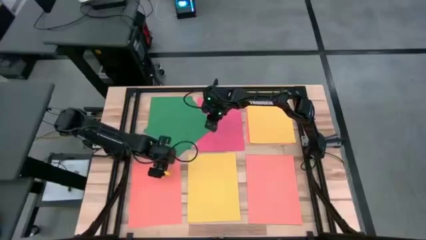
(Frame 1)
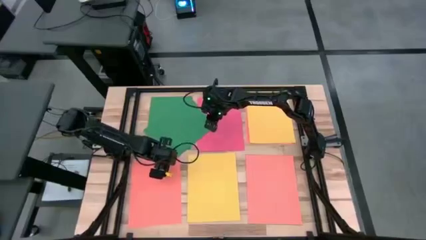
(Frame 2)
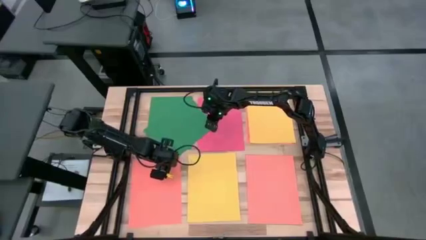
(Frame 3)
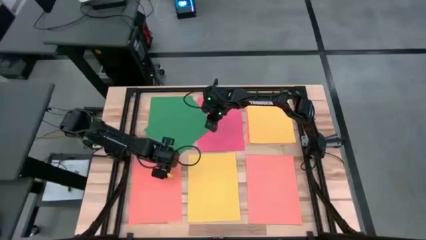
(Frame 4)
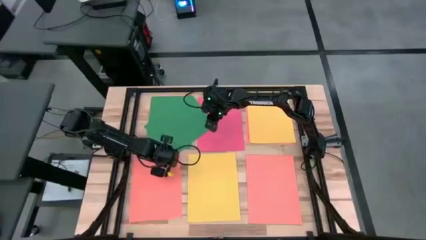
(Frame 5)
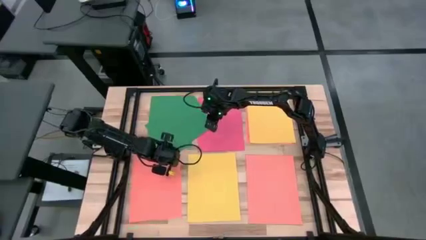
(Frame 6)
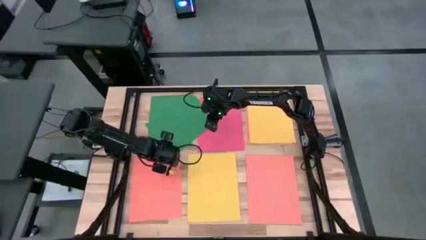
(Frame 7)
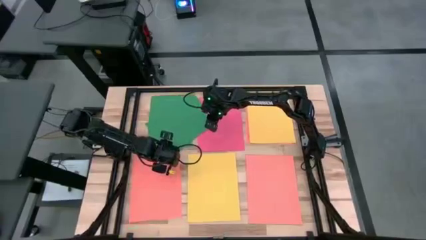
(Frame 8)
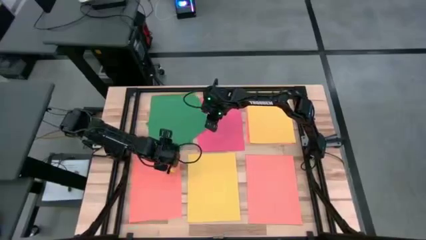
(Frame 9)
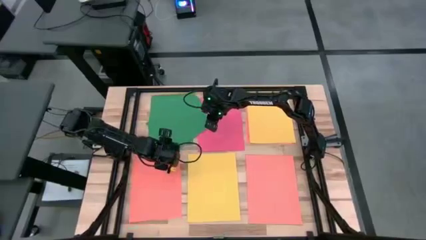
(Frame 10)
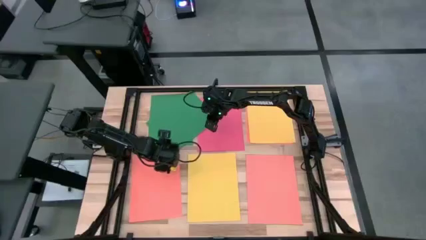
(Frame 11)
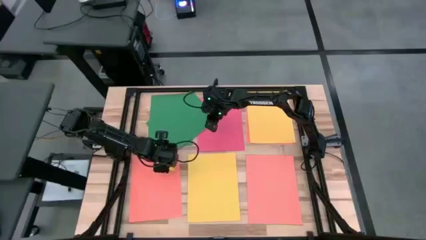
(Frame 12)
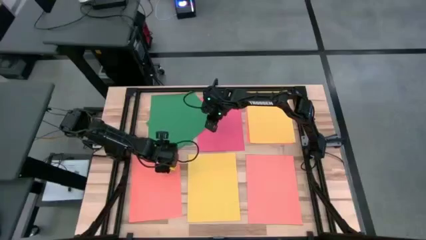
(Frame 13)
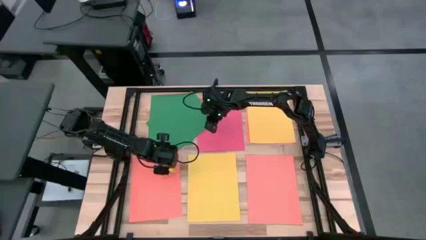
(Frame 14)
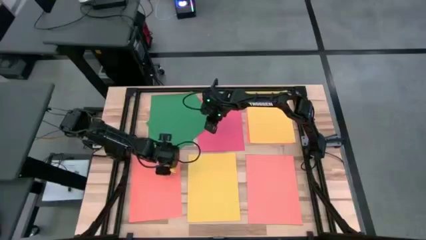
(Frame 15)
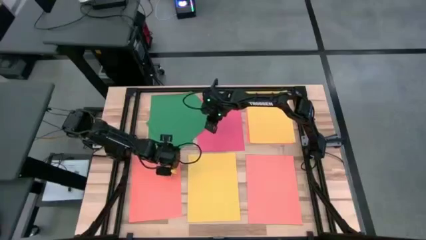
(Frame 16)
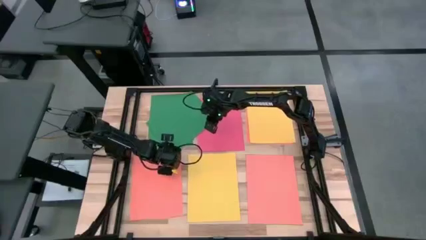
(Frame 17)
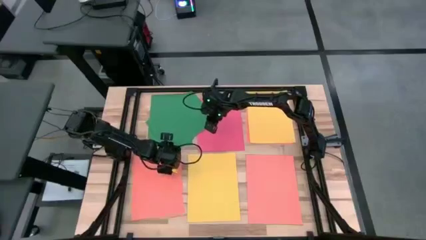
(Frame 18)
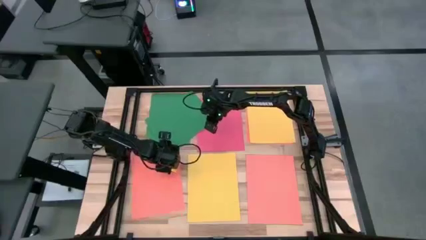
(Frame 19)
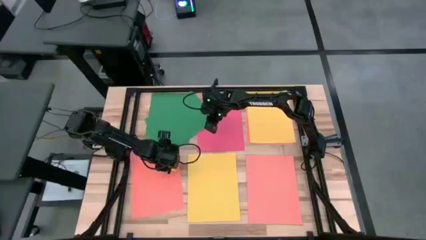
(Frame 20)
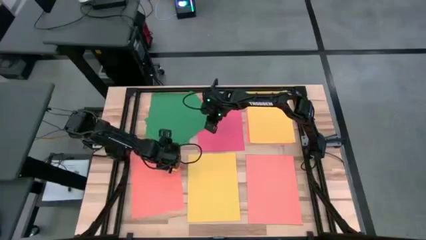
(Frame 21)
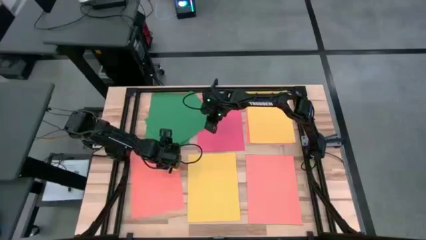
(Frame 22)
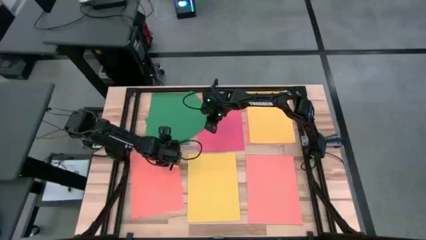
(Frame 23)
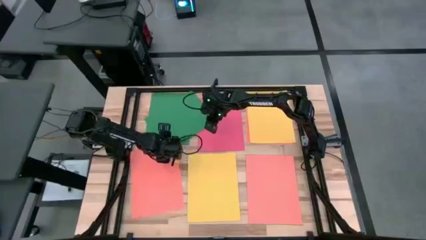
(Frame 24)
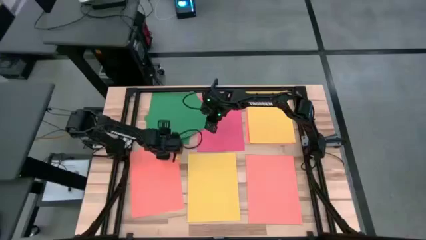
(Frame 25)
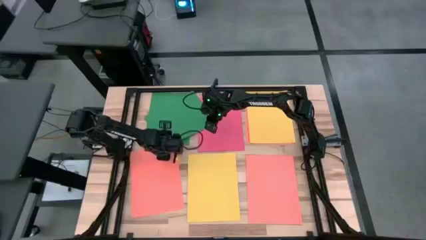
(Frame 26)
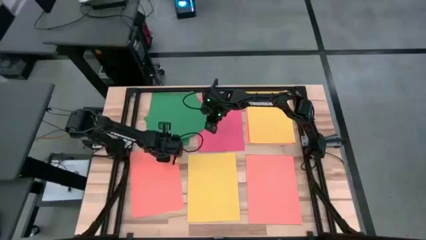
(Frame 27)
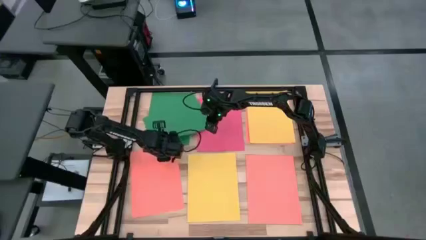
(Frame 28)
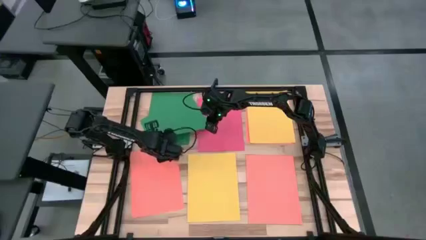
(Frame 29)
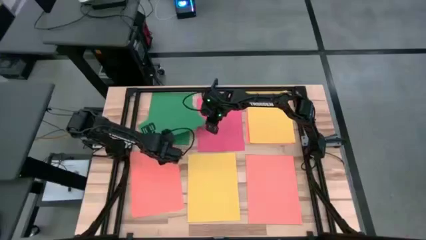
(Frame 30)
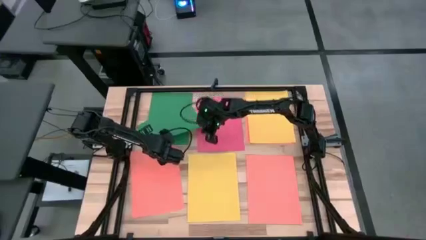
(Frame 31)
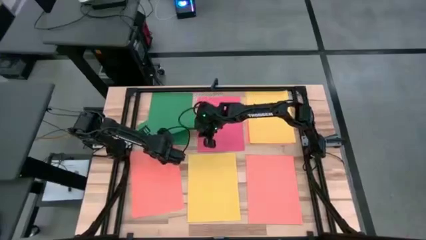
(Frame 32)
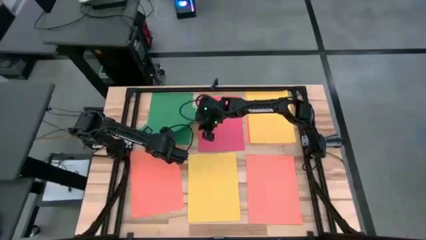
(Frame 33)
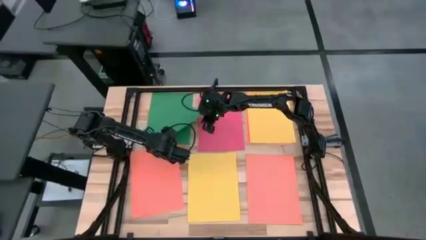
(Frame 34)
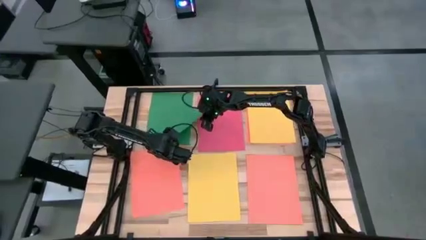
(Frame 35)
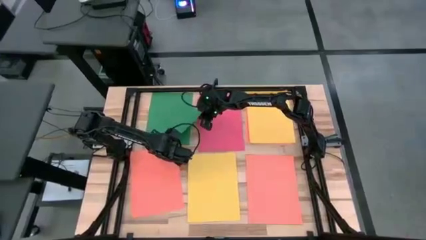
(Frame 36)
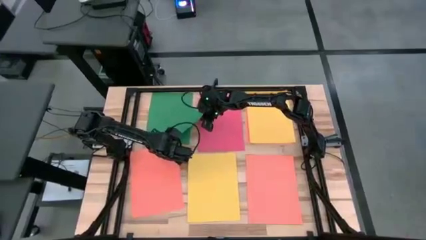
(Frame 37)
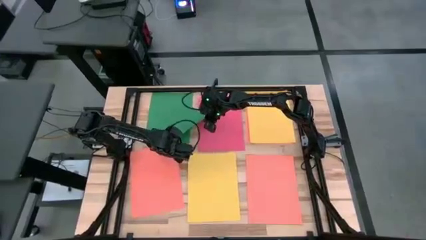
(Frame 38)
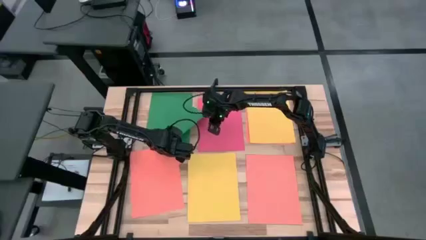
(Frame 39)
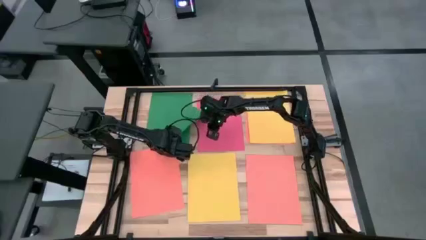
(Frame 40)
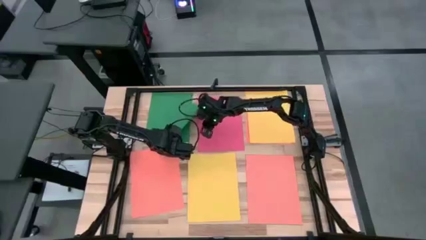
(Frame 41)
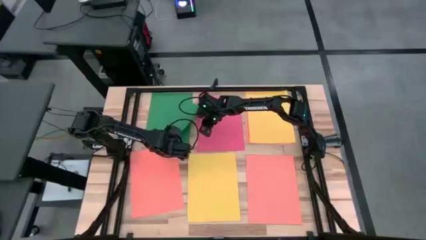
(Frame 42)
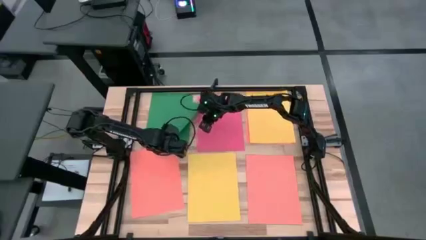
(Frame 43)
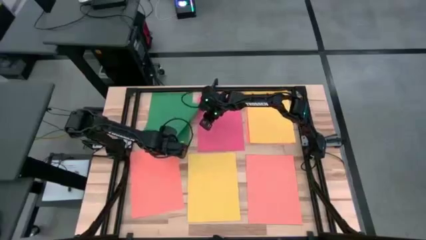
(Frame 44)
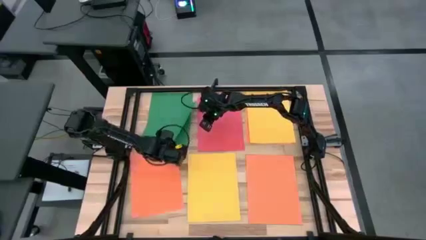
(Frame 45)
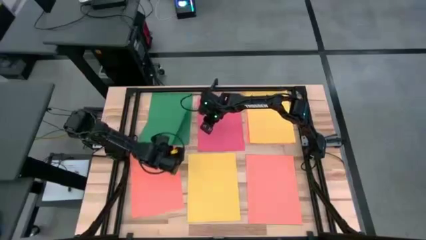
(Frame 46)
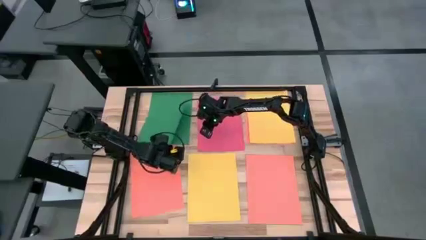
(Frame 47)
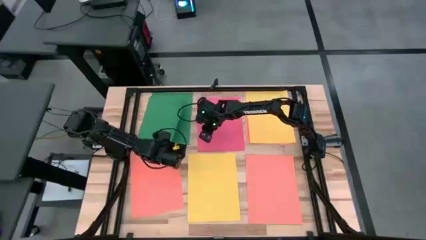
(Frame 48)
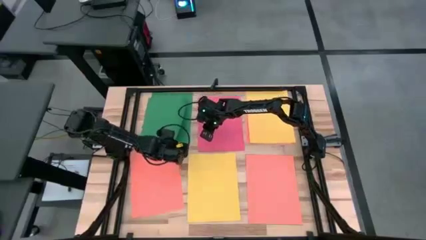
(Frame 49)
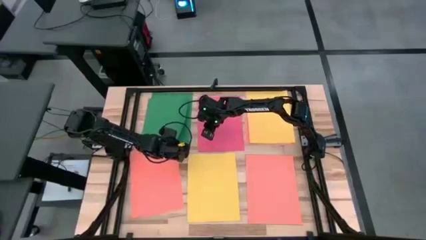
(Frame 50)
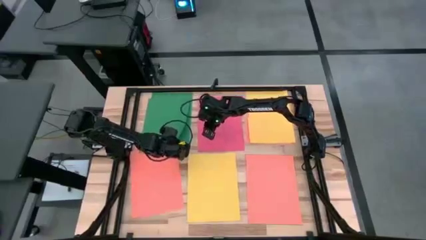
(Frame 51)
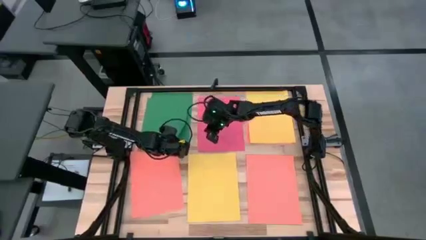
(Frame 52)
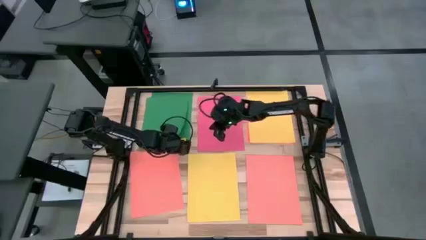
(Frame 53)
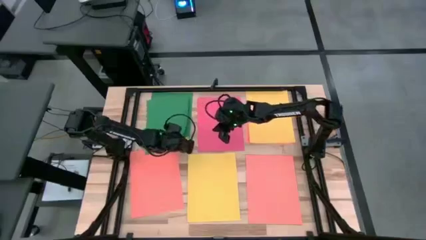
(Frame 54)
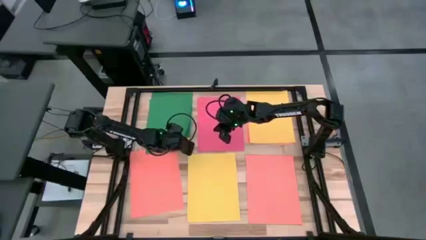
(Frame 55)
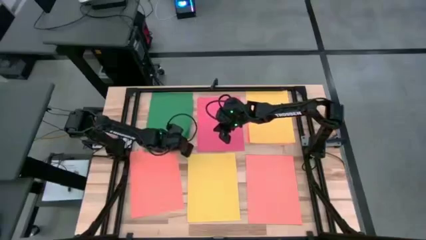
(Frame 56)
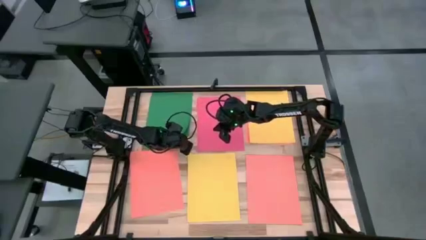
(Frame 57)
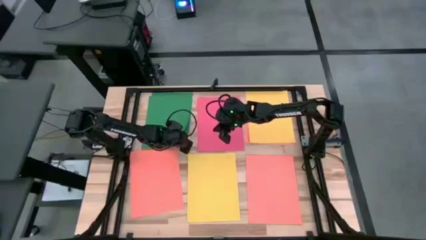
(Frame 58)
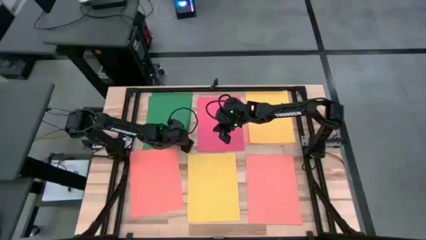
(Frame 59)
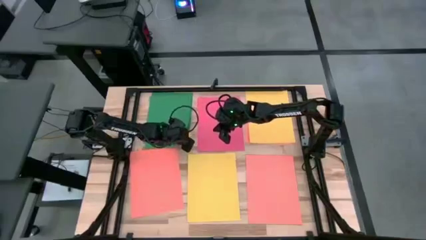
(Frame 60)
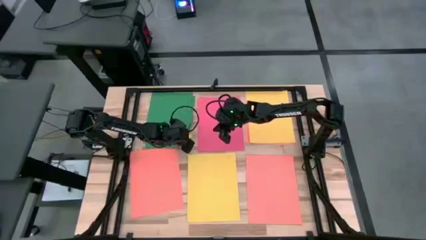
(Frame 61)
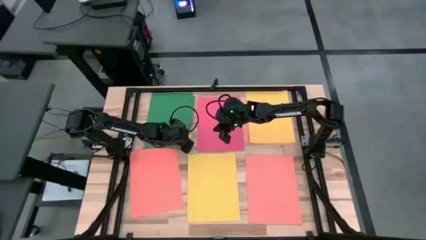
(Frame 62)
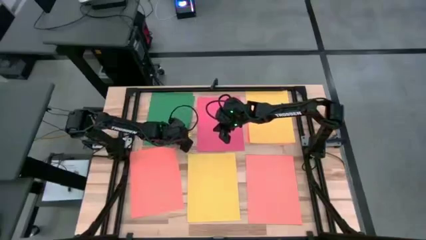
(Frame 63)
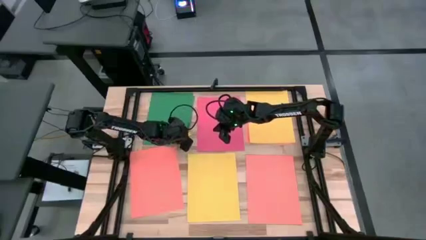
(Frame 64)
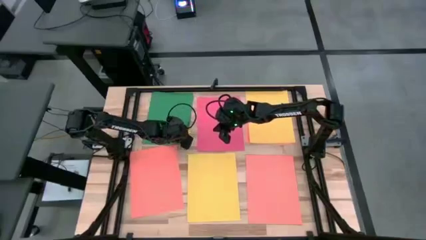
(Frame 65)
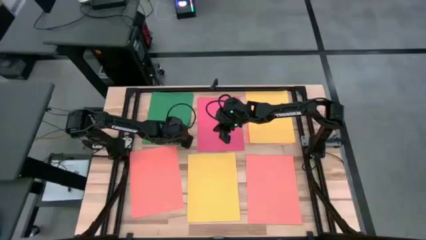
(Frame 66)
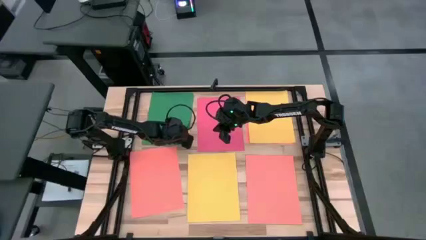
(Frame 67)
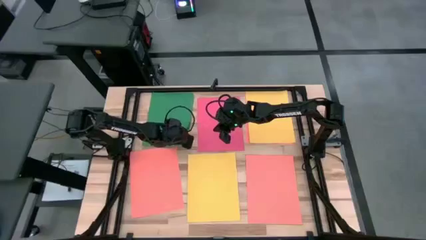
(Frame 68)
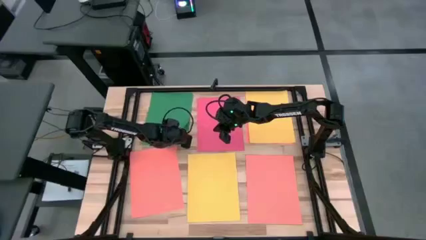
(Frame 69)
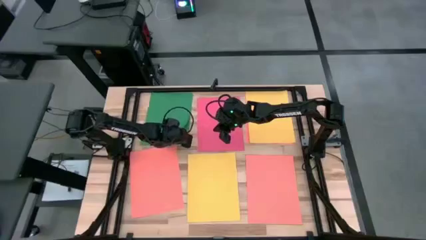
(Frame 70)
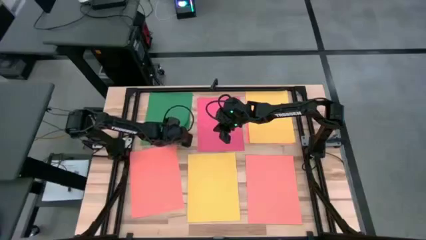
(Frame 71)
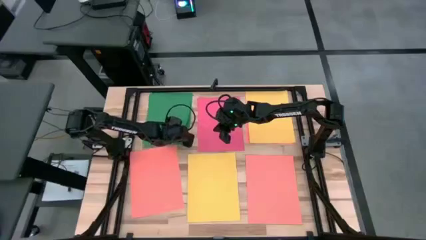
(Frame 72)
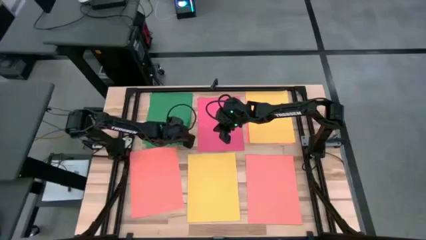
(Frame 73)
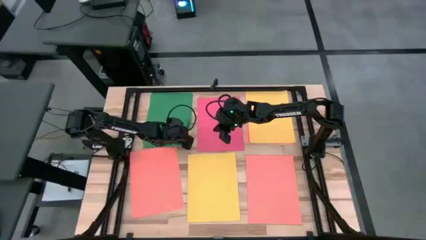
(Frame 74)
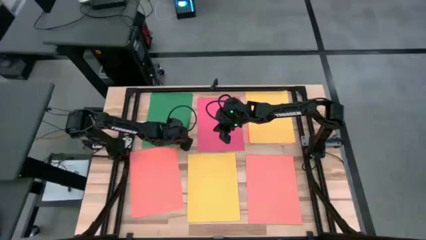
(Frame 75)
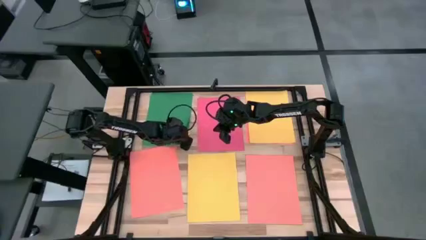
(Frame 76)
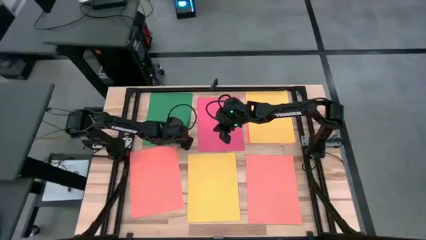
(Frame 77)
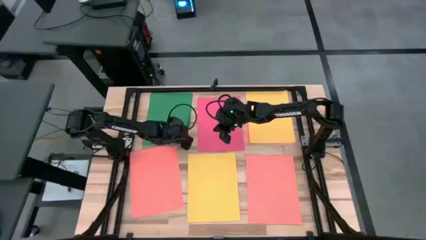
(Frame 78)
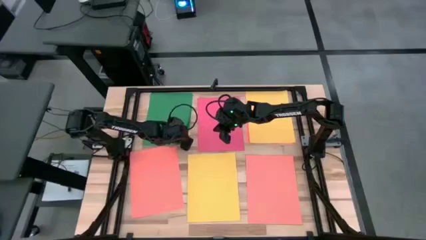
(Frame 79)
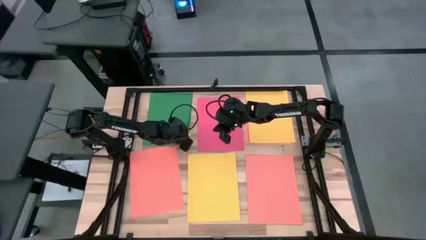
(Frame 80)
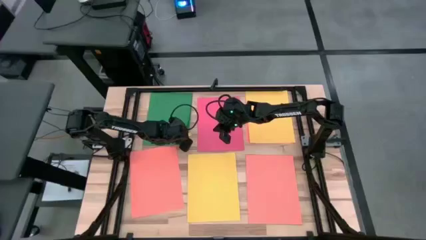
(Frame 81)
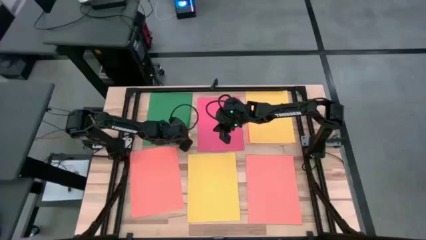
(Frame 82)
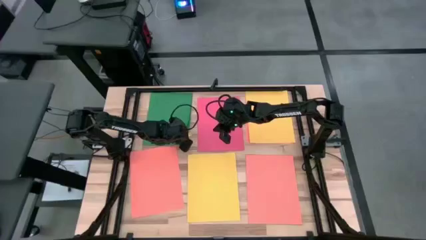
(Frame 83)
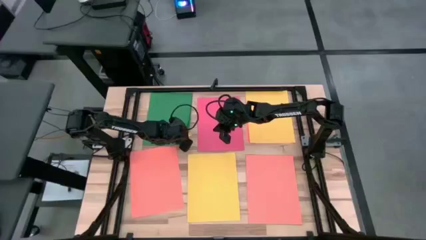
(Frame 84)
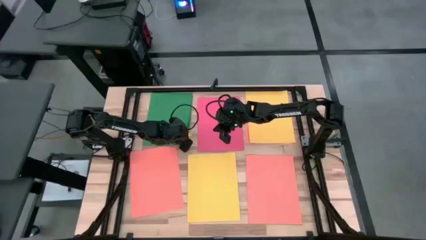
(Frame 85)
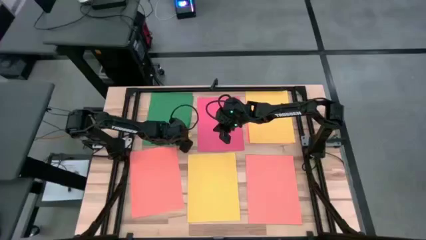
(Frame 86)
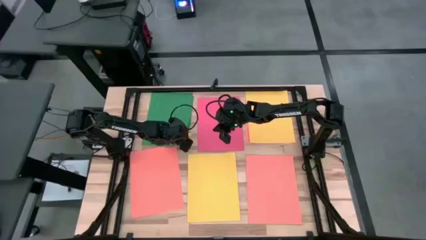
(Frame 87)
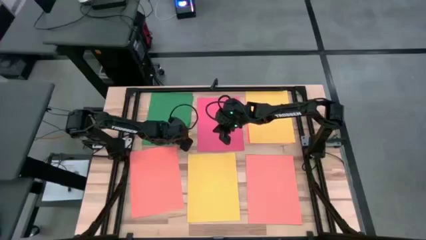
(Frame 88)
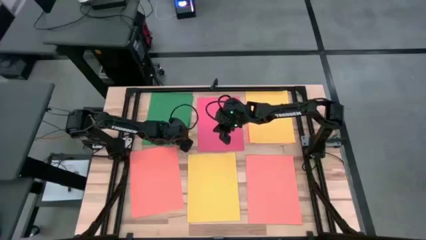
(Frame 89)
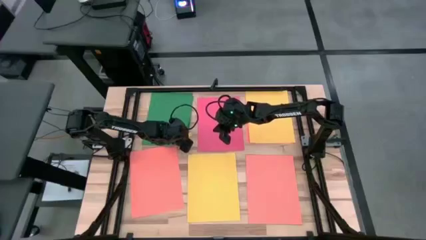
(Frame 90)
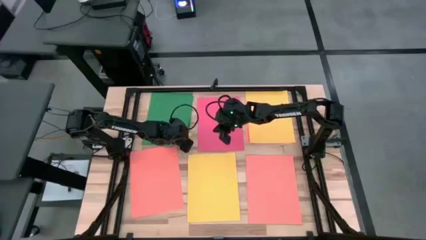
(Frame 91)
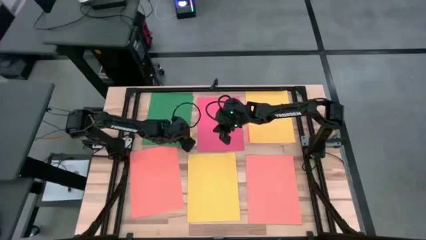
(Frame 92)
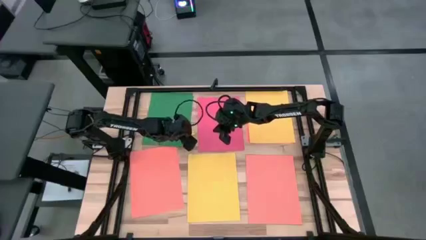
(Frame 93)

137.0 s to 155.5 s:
Task: Organize paper
Stack the green paper on top of the green paper
